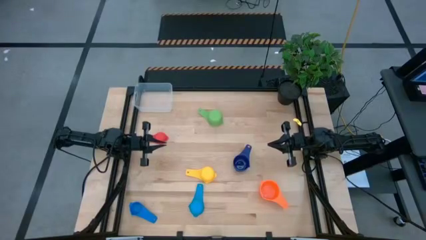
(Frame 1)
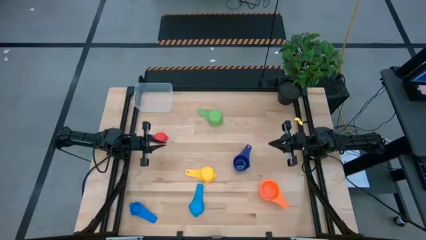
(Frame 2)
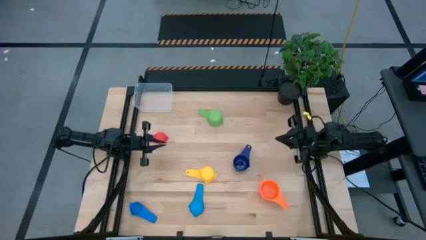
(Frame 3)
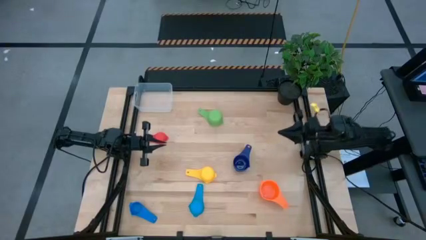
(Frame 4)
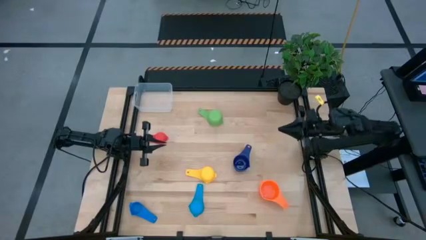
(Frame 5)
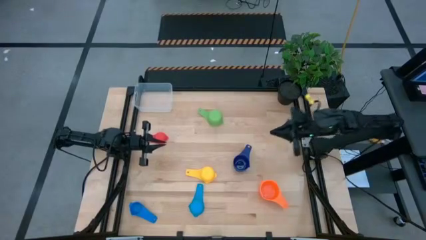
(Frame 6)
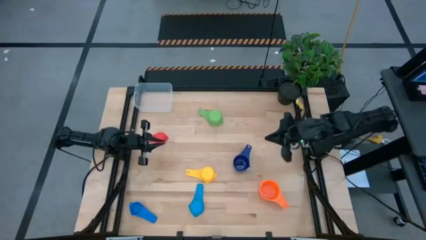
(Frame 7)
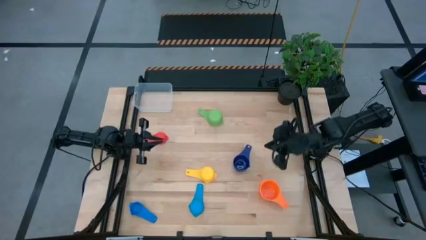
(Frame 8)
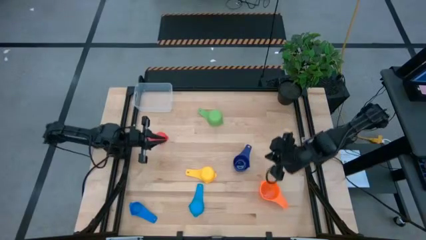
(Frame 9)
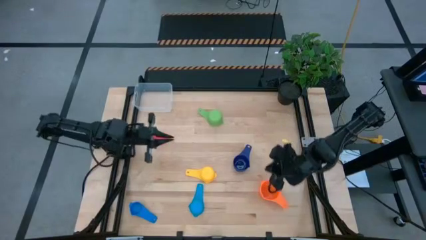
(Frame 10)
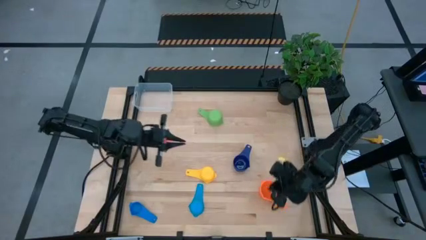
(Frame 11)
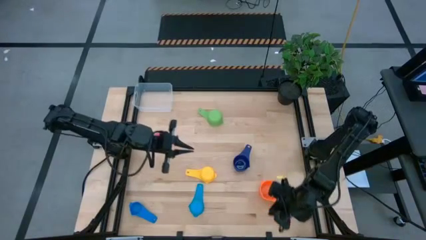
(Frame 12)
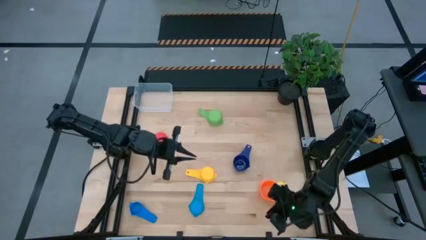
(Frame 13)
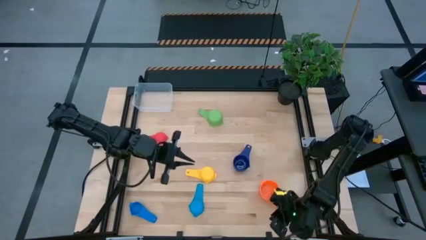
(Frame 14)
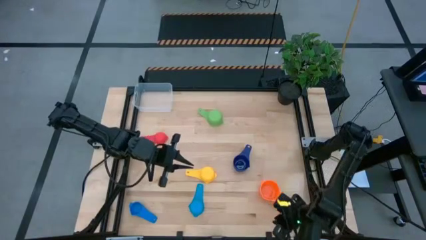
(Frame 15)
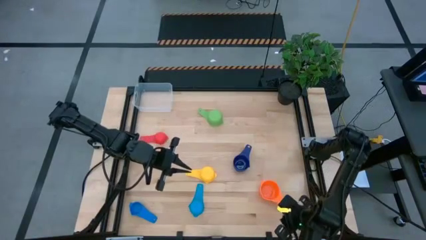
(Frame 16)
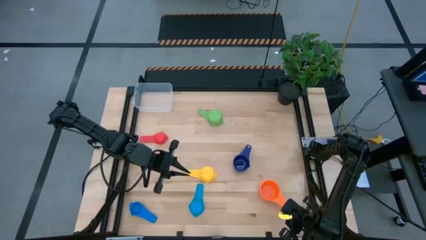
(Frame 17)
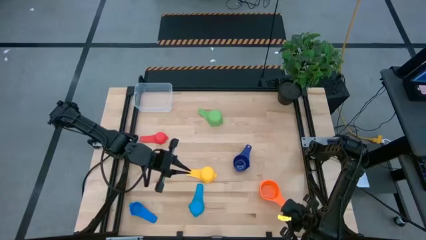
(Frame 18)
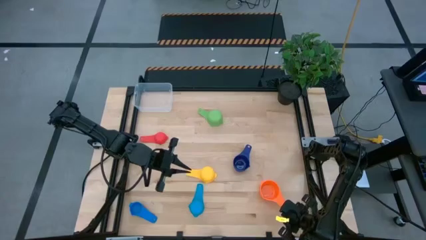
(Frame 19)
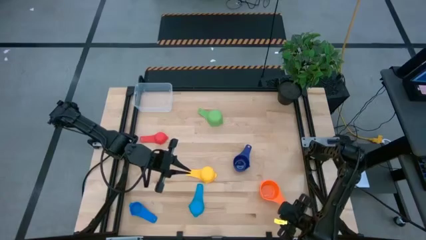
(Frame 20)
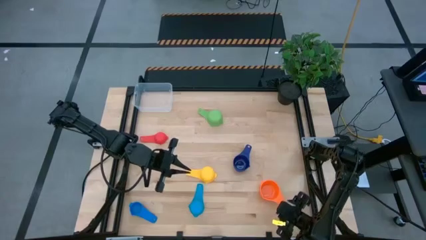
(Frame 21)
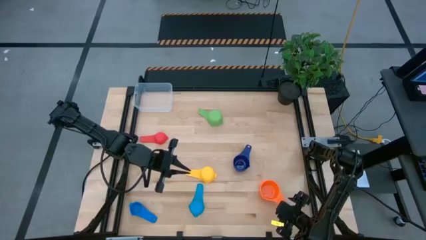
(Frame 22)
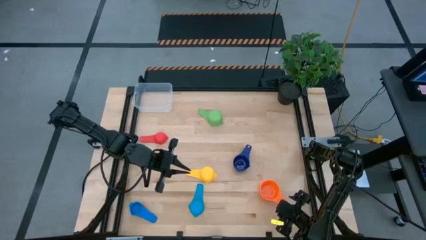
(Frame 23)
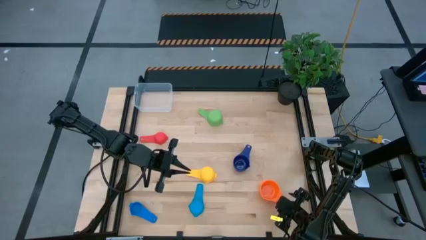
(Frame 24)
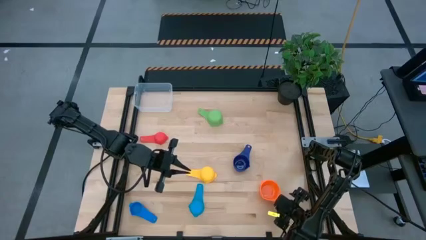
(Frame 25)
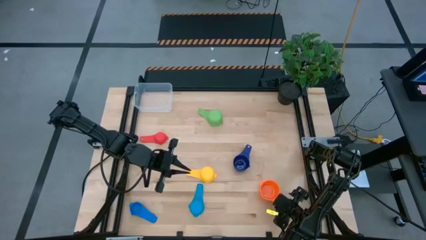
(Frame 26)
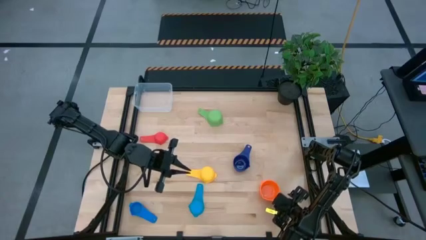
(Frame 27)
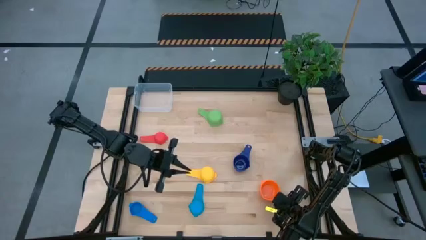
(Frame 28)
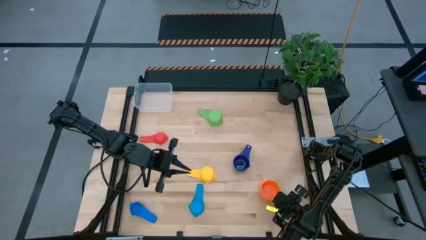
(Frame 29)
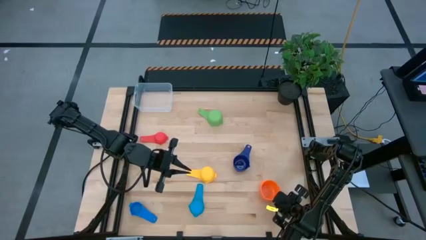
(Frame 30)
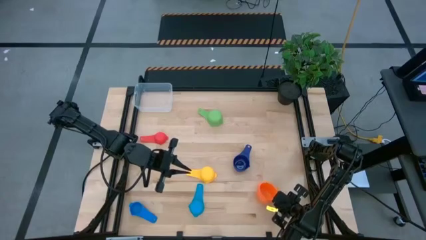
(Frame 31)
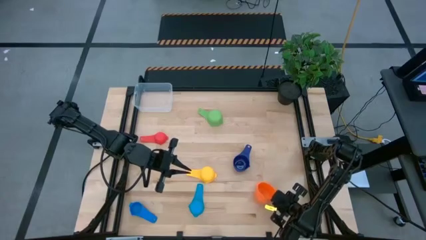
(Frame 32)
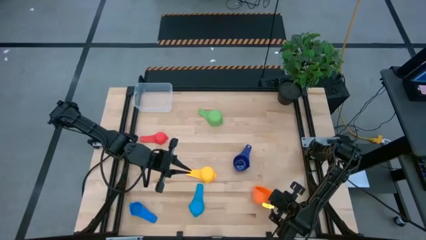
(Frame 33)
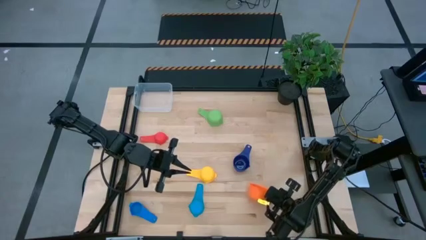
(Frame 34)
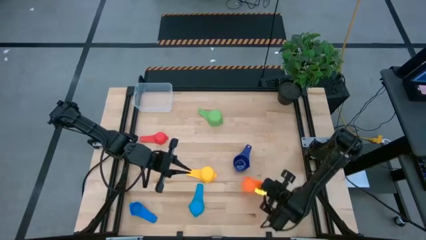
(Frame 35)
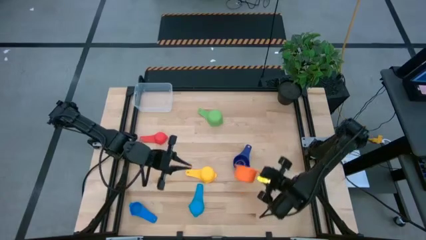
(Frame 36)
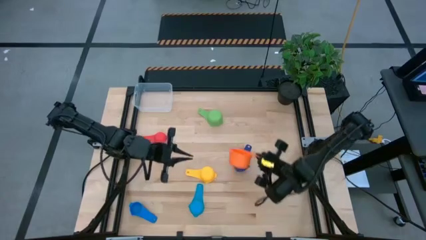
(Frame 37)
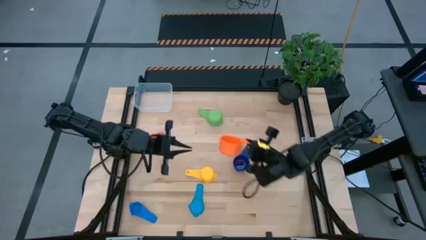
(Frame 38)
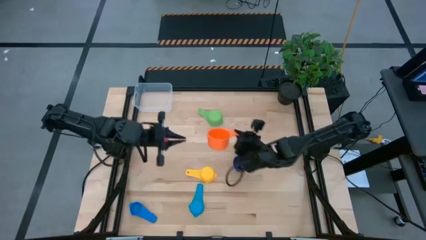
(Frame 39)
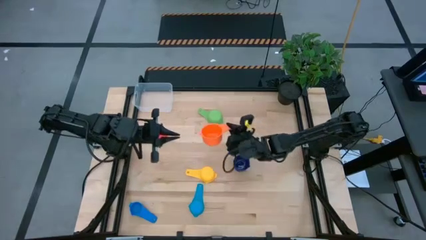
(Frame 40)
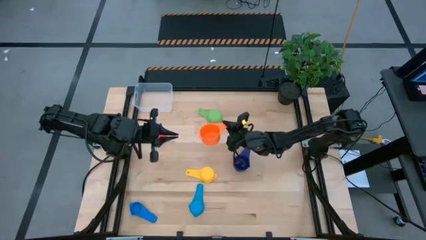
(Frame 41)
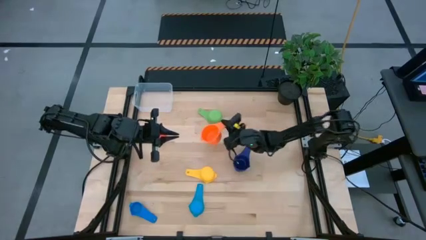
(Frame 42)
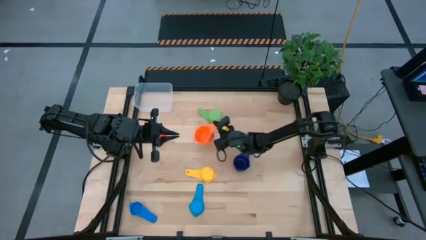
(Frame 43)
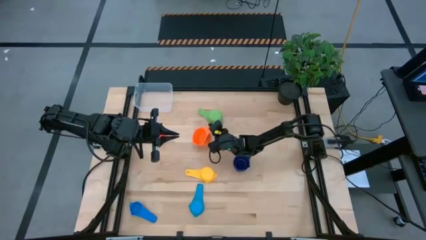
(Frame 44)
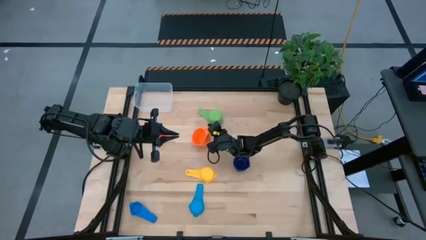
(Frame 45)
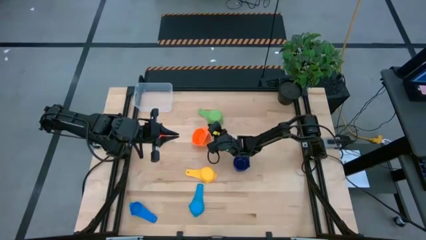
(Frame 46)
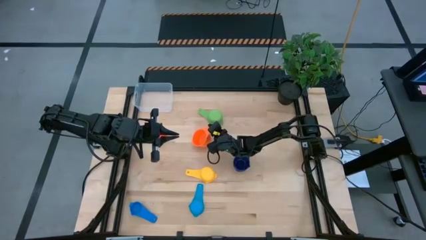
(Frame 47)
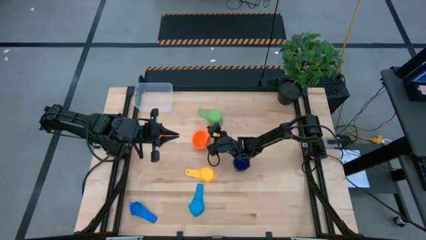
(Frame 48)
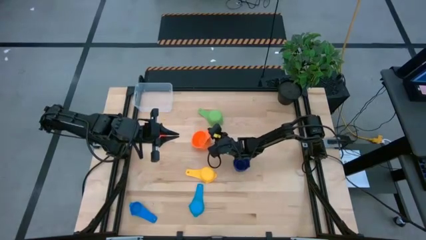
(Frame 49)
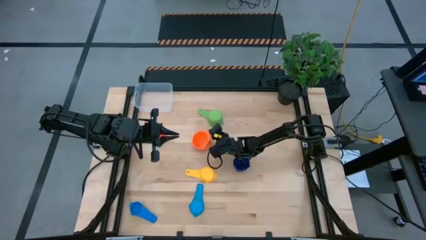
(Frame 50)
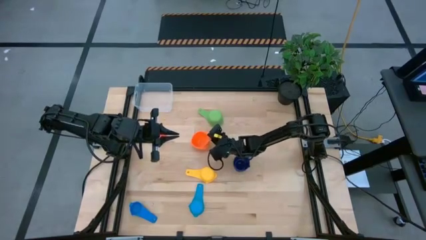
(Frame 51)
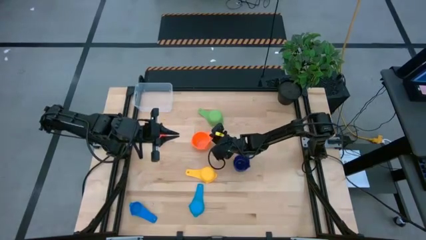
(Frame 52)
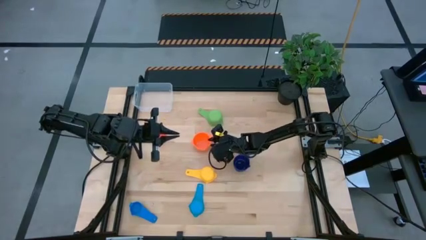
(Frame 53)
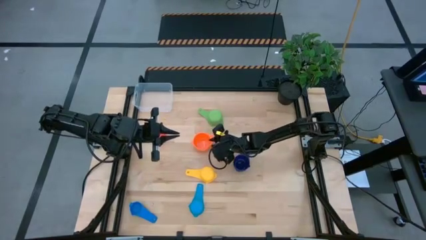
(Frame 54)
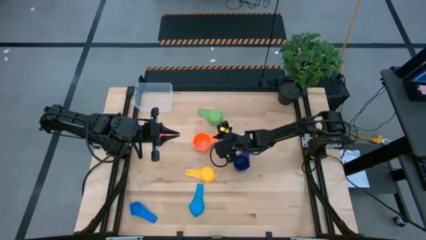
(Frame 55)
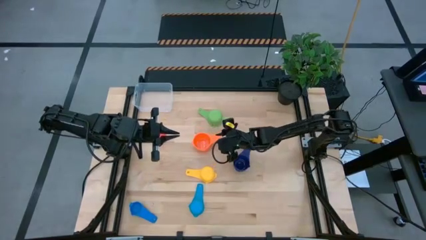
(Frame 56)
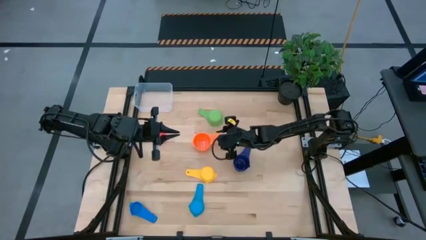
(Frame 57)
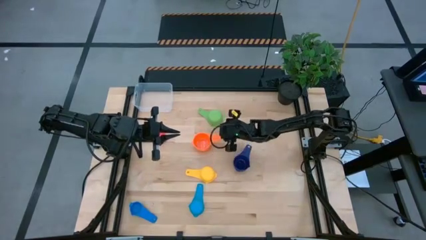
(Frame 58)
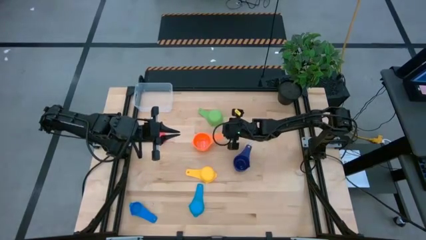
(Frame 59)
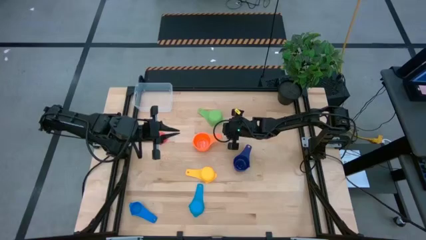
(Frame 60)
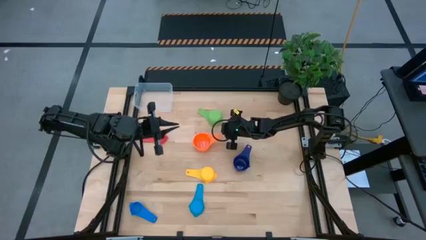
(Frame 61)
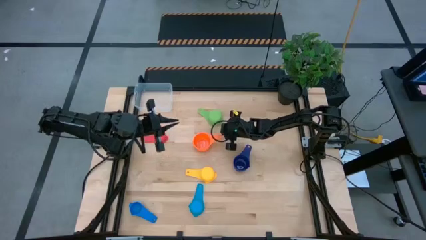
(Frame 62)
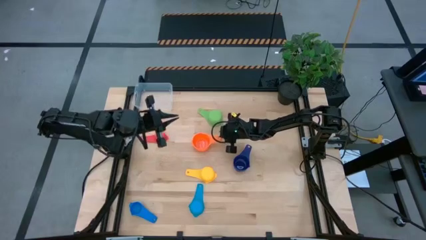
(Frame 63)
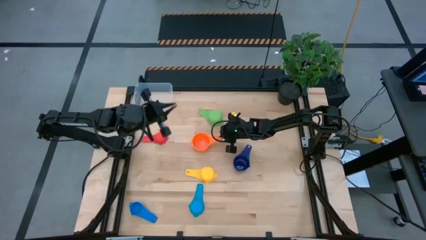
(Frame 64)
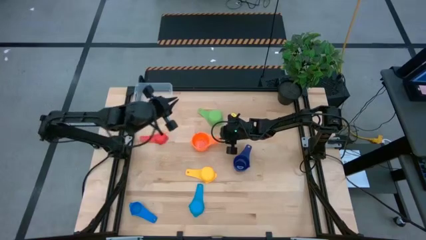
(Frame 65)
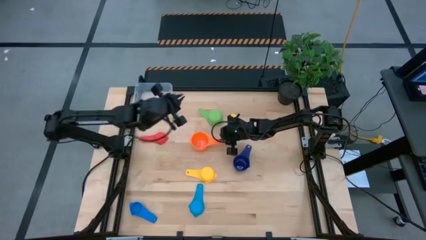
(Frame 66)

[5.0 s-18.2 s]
Task: Nest measuring cups in basket
Move the orange measuring cup to the center
